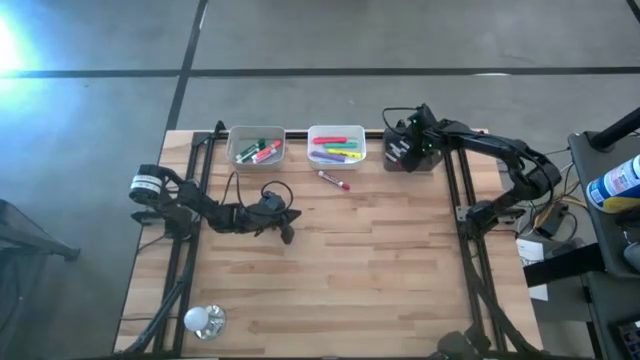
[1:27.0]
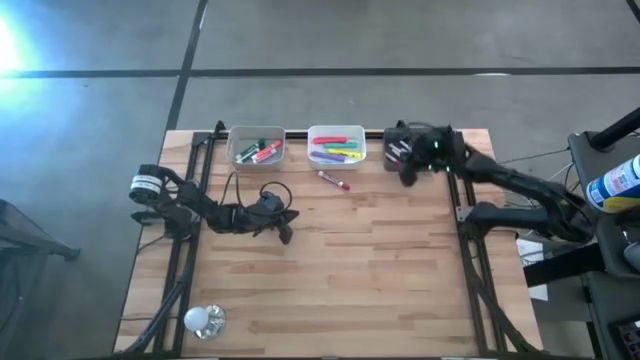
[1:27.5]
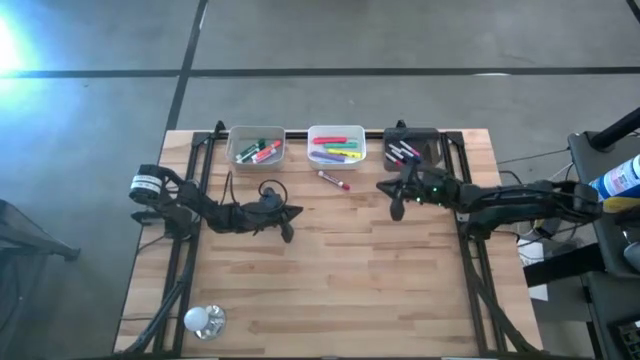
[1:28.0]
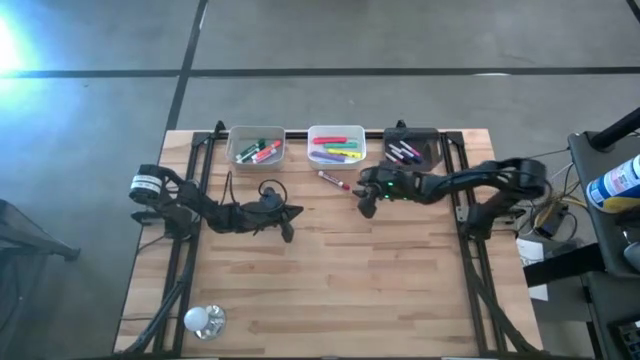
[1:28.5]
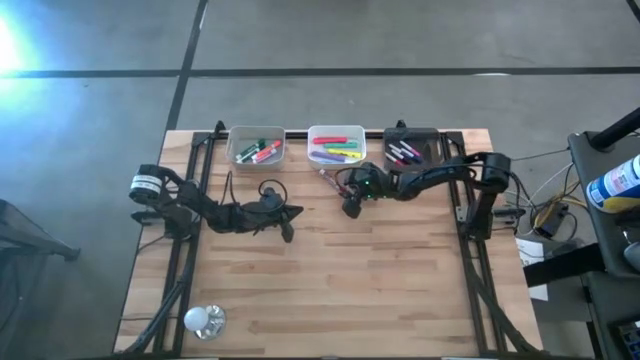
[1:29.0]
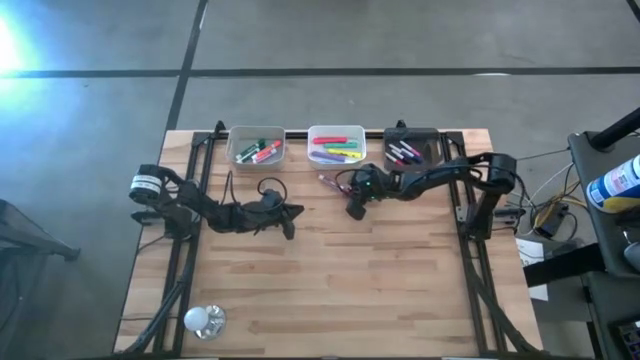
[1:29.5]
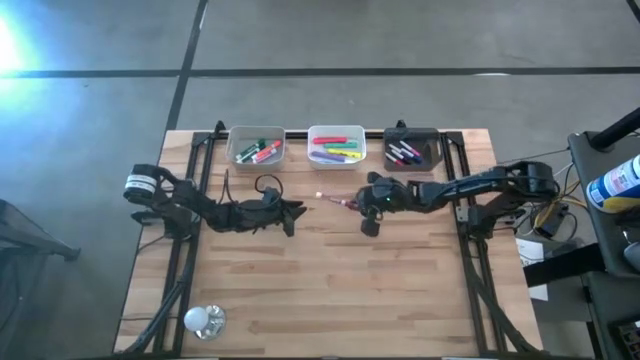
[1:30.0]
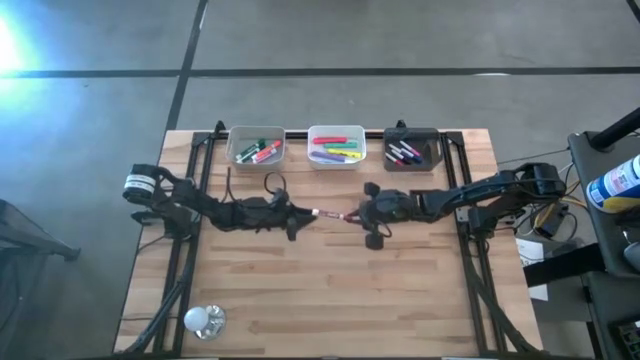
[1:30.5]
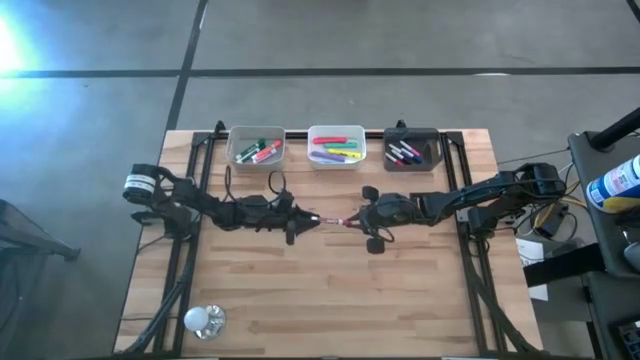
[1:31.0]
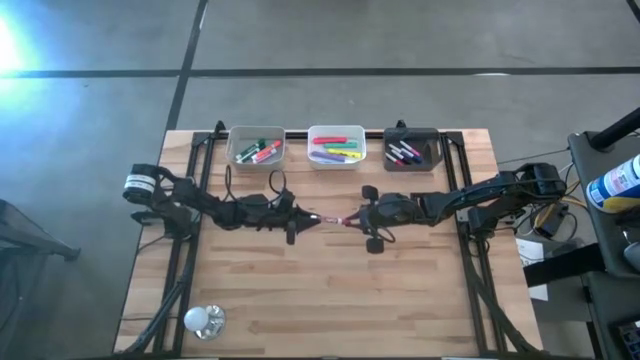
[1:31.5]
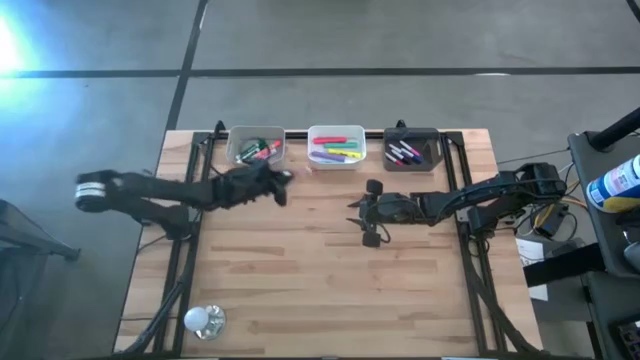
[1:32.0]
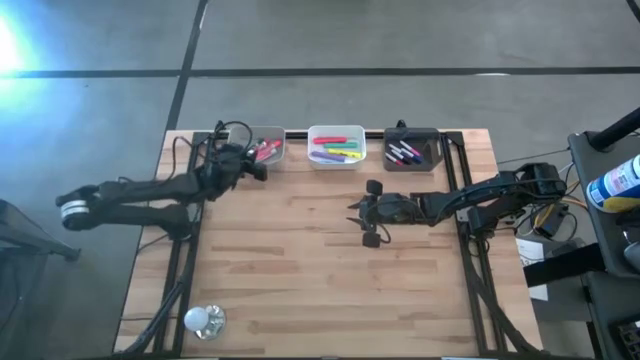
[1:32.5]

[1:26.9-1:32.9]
Task: Pick & Place Markers
Put the red highlighter pen into the gray bin

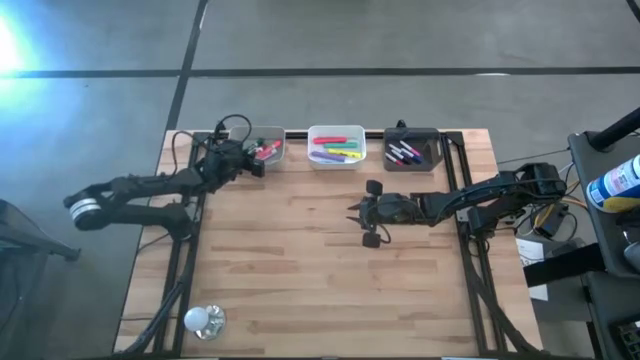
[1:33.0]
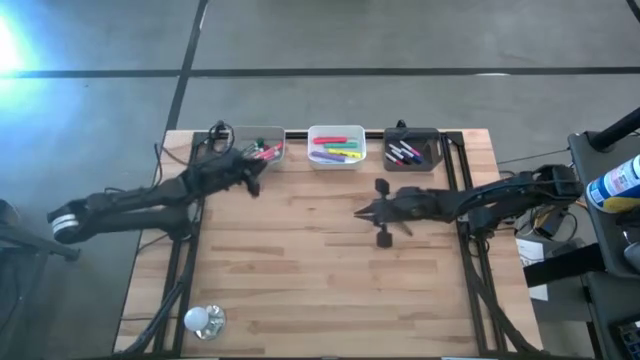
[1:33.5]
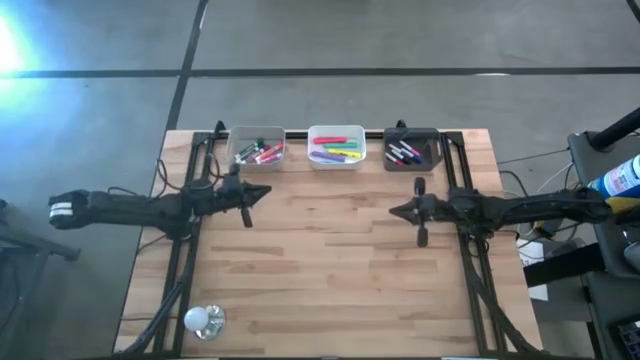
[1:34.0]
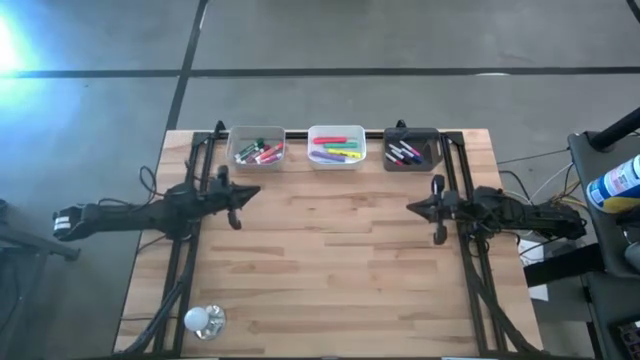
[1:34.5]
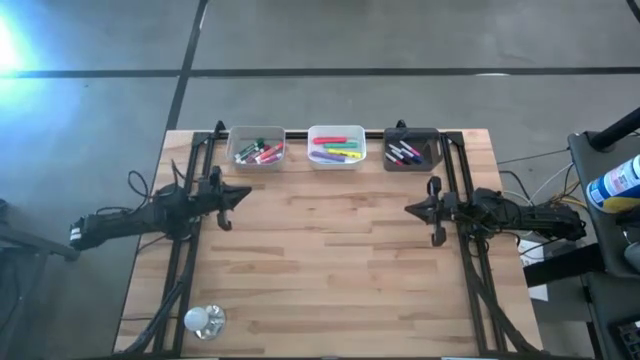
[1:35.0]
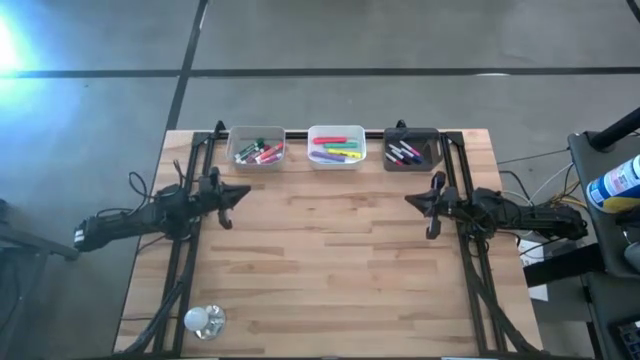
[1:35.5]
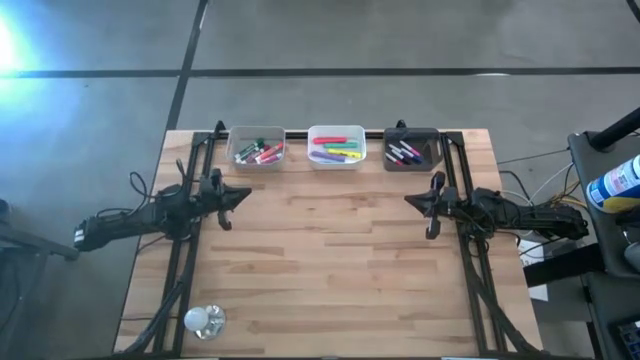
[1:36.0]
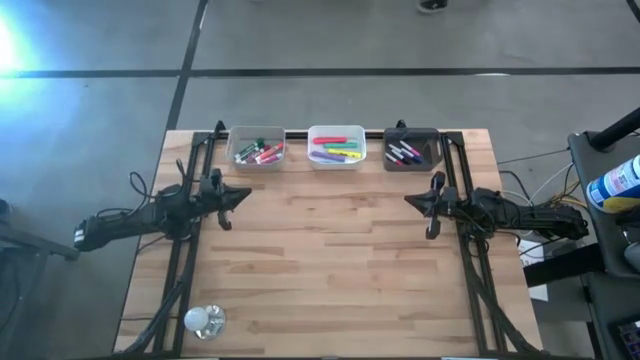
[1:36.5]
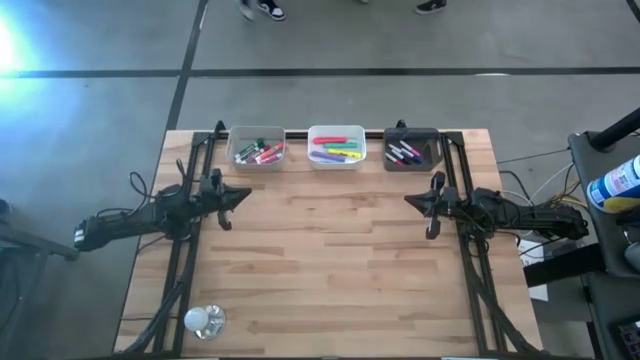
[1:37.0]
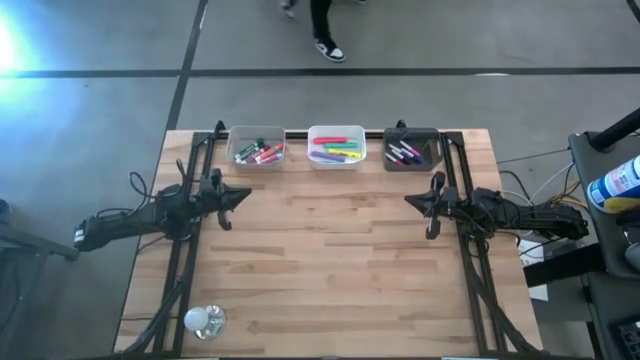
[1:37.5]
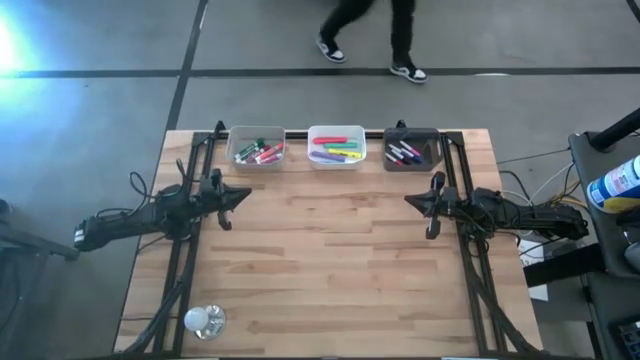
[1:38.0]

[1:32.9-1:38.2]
Return to Home Position

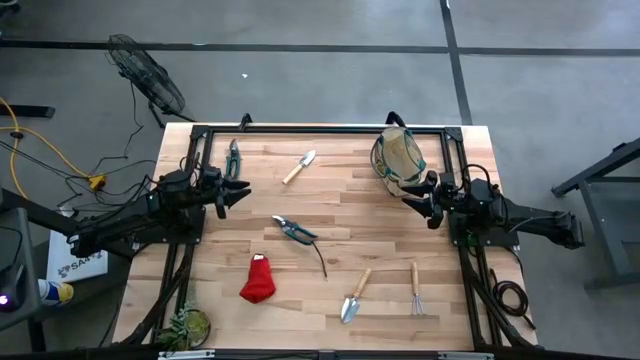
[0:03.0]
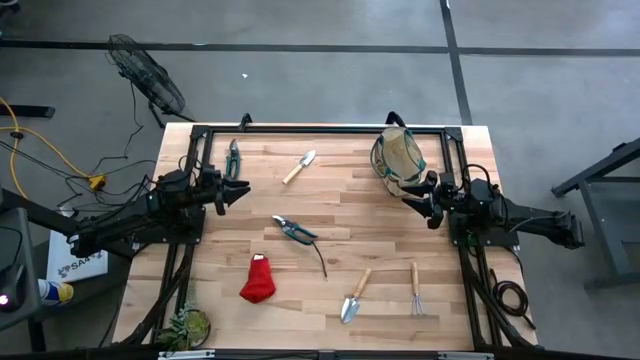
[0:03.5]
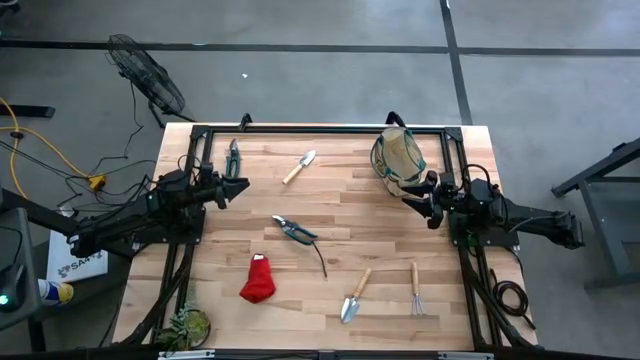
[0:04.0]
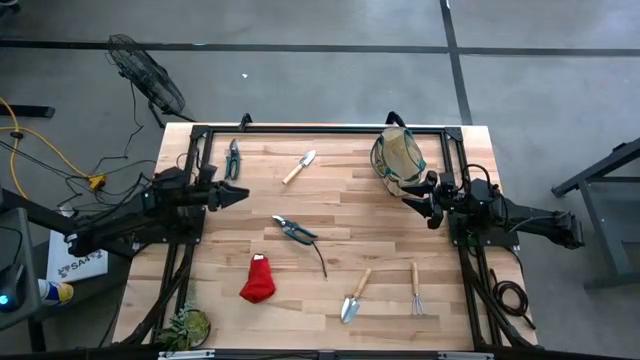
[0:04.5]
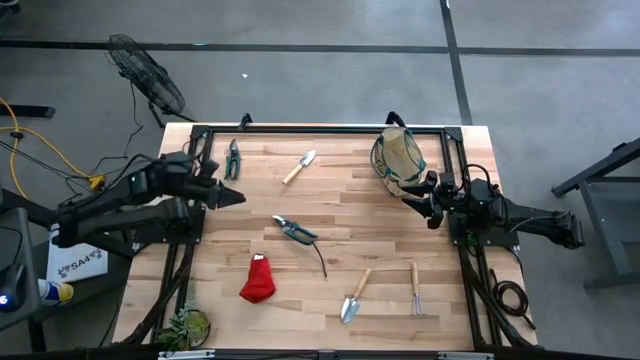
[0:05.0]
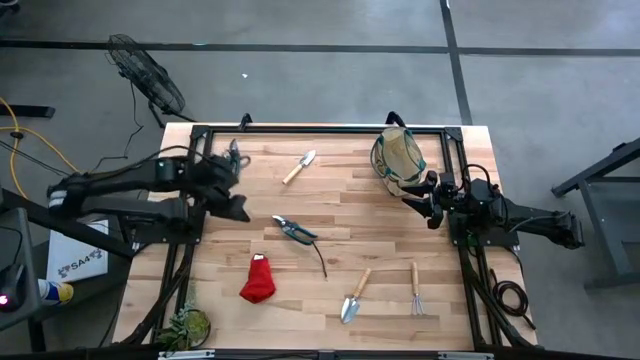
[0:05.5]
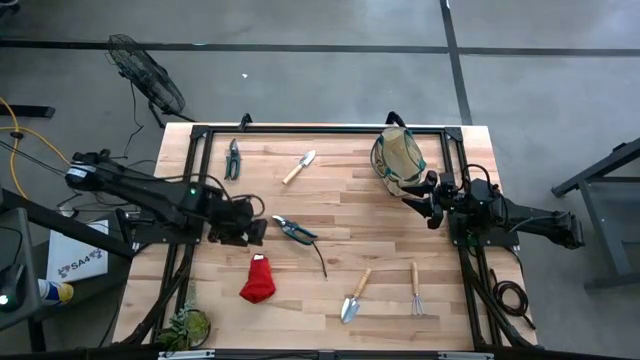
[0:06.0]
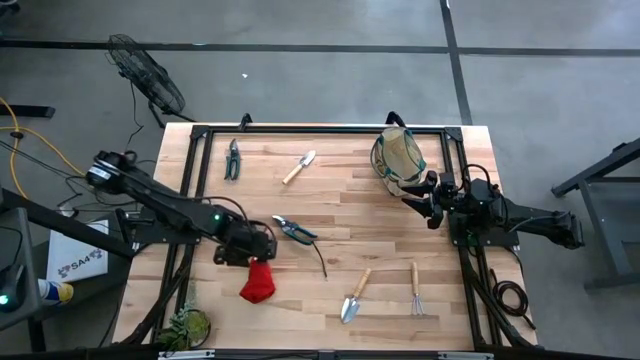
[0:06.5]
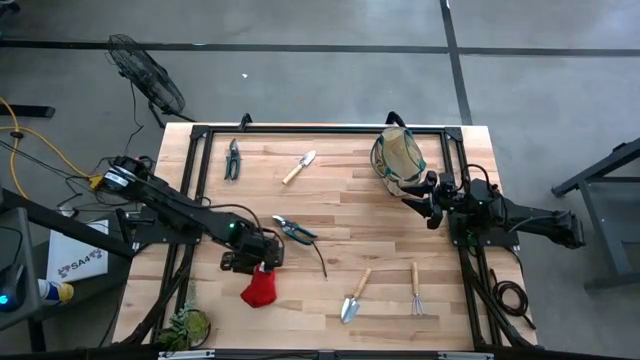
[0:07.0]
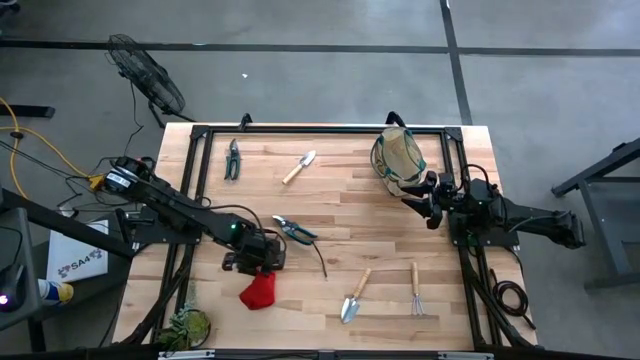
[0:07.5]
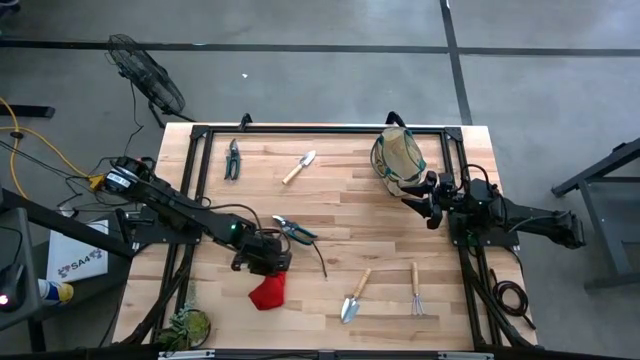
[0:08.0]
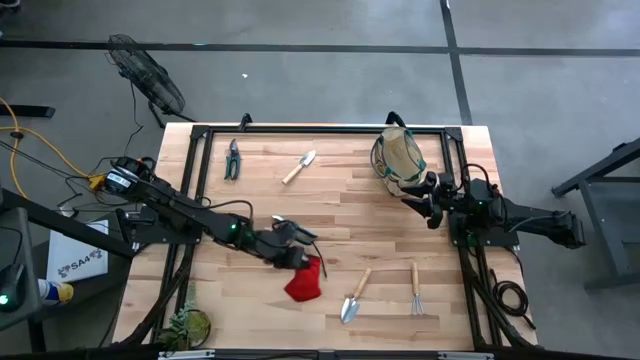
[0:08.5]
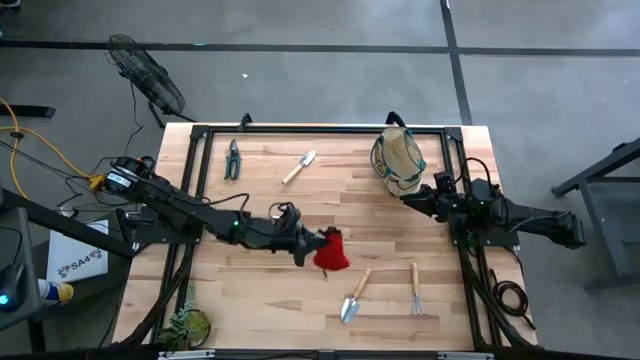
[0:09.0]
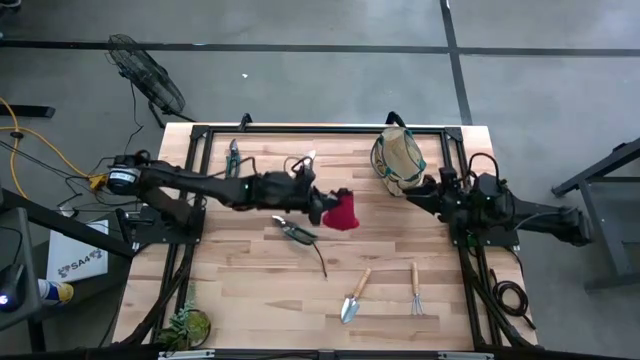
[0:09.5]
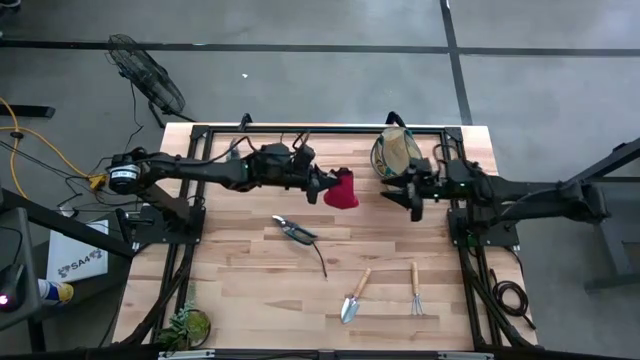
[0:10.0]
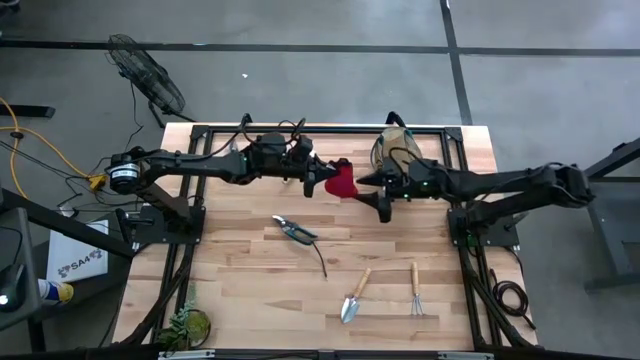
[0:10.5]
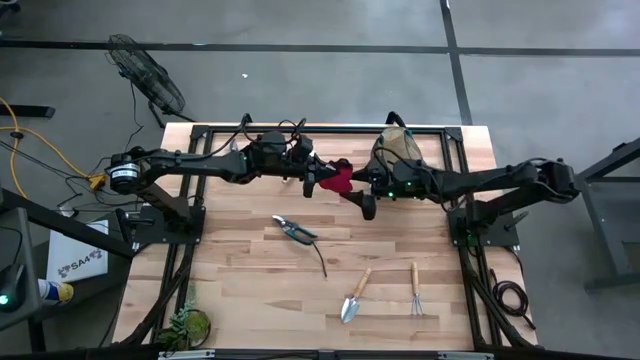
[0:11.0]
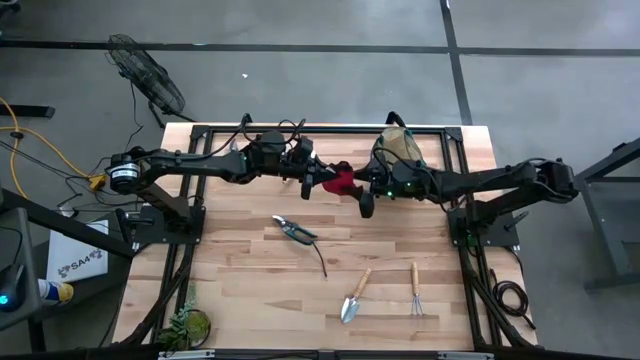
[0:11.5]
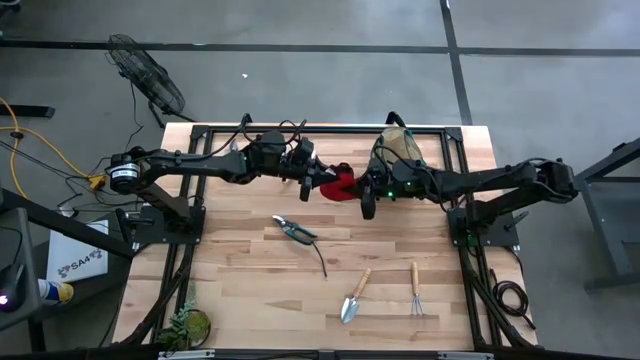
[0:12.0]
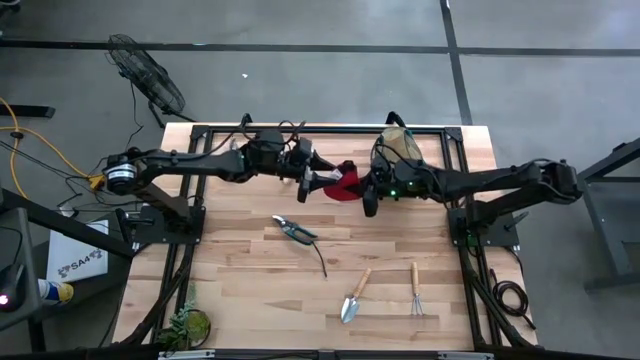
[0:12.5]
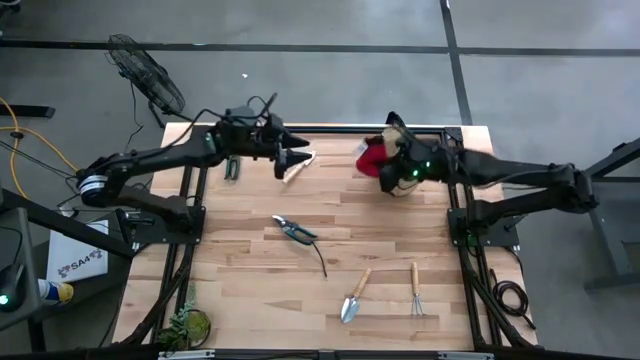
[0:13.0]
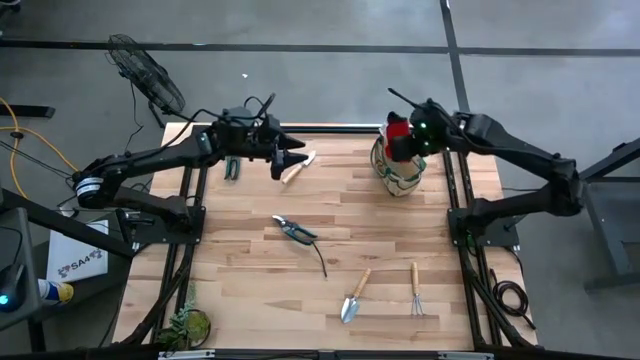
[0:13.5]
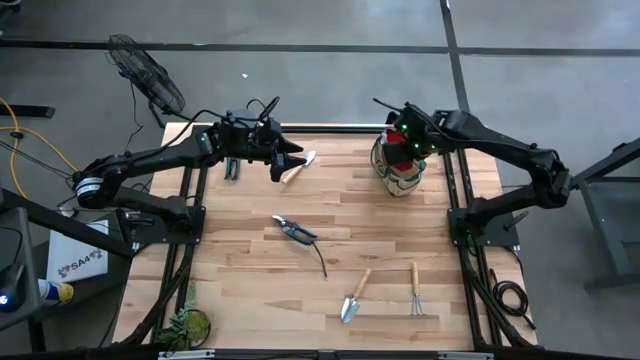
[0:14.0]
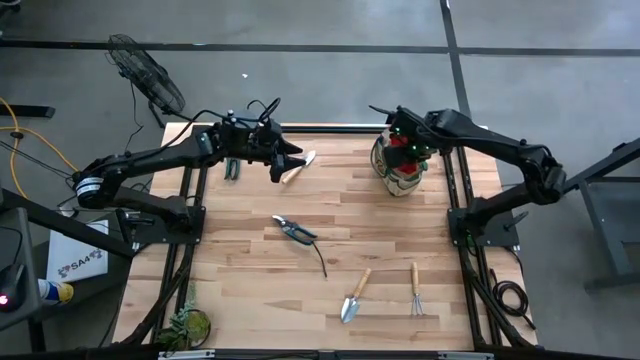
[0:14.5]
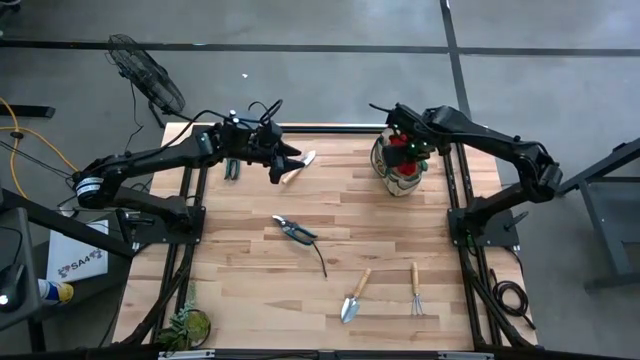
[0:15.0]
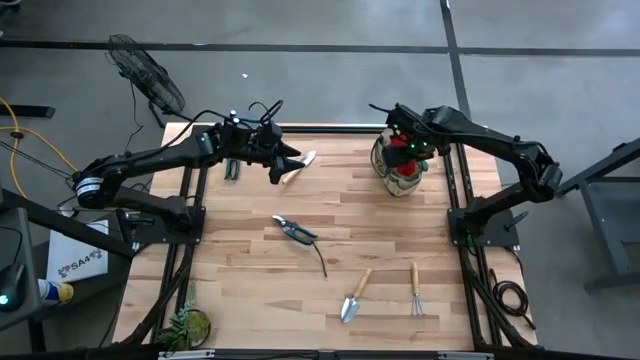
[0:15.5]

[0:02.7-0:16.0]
Task: Pick & Place Garden tools in Gardening bag
Put the glove into the gardening bag
